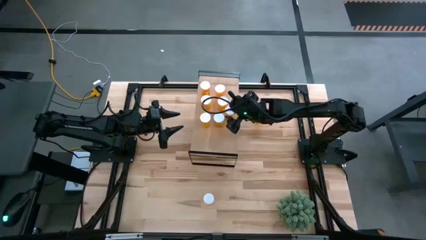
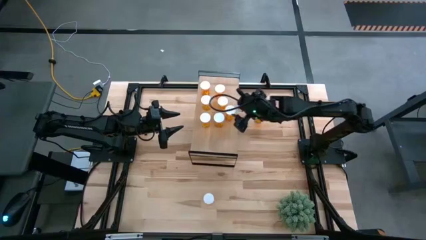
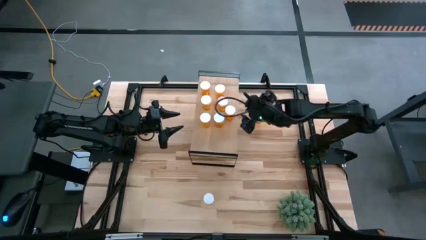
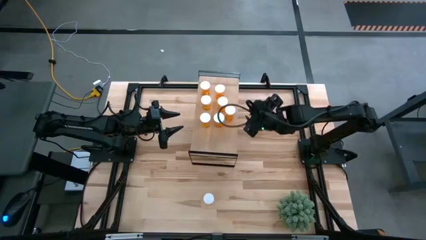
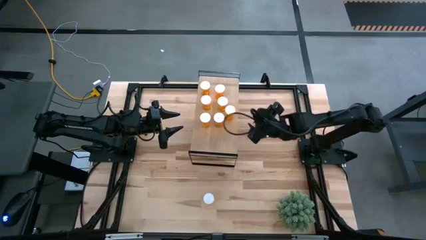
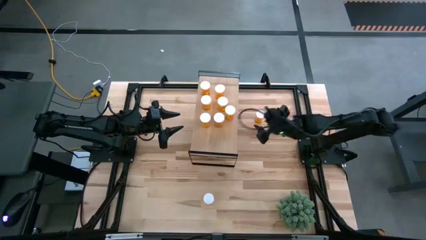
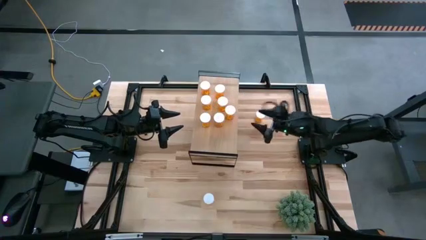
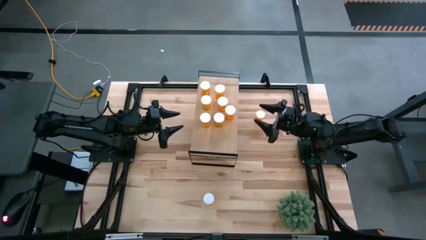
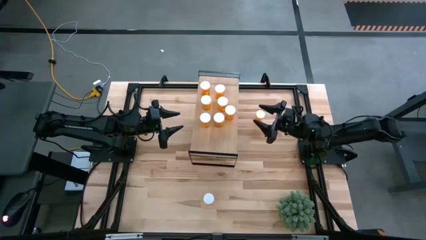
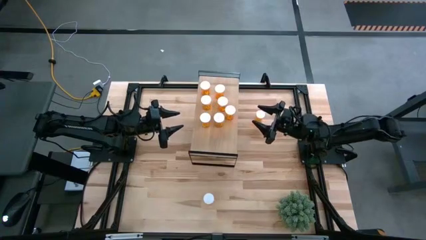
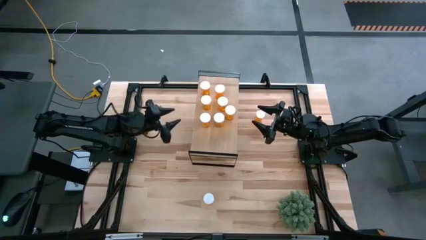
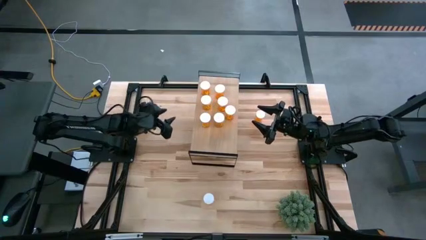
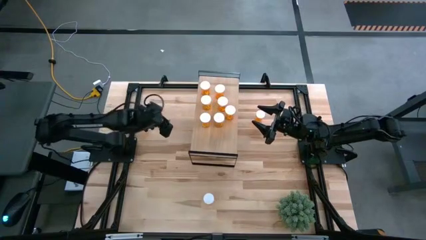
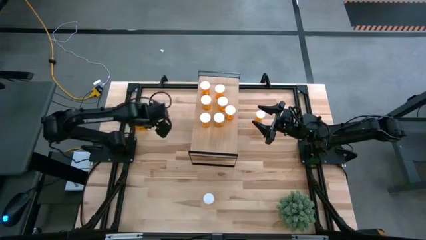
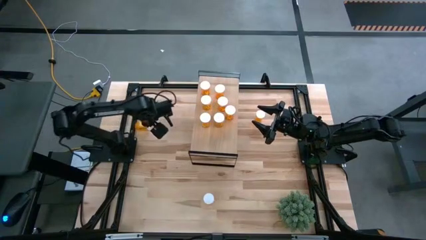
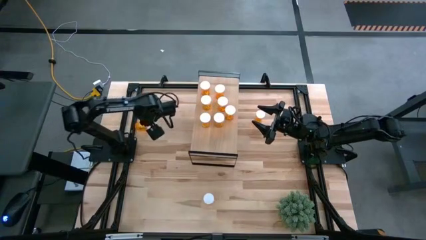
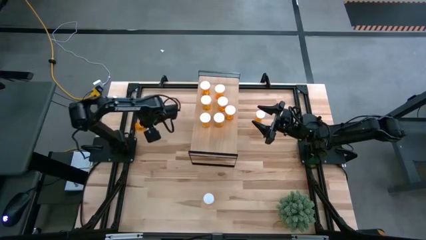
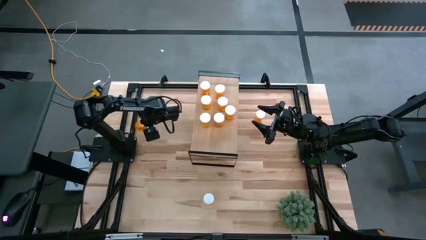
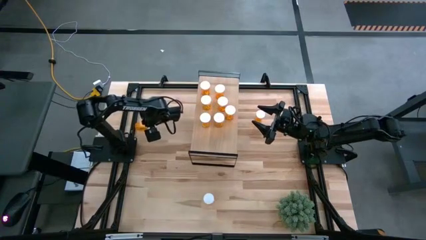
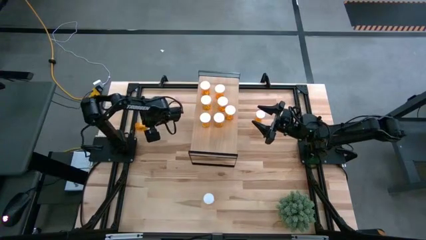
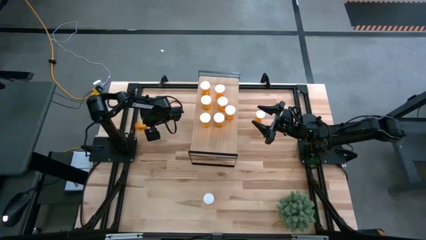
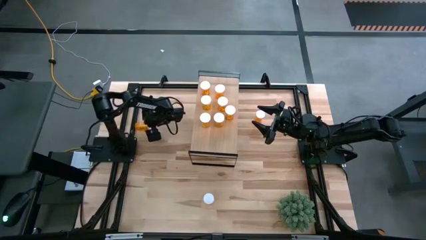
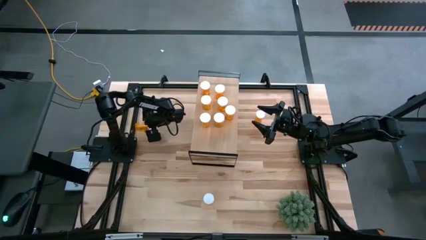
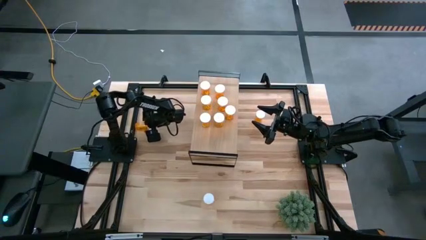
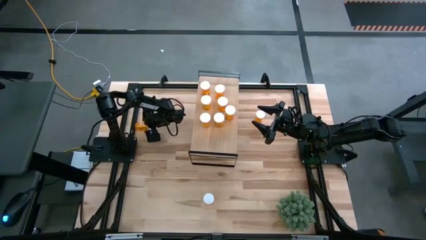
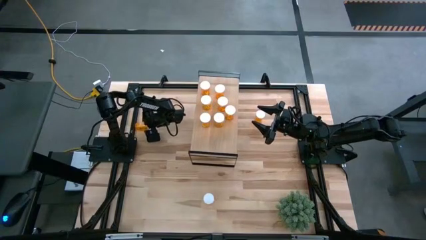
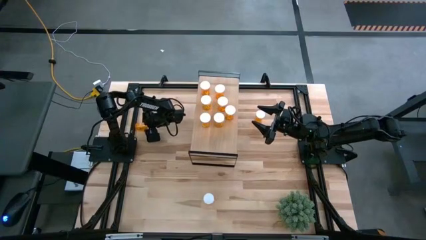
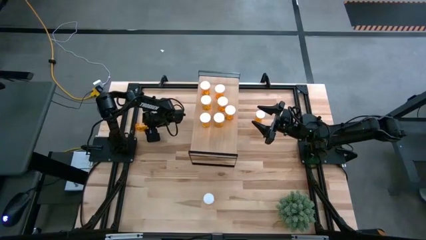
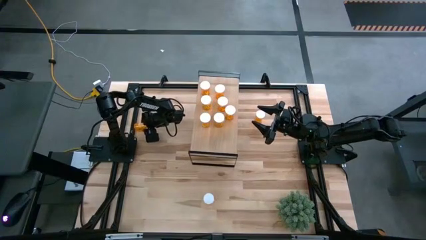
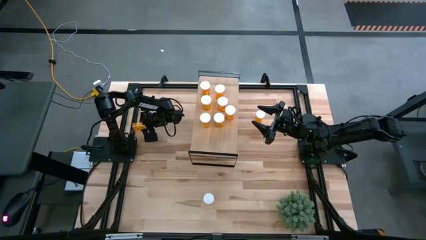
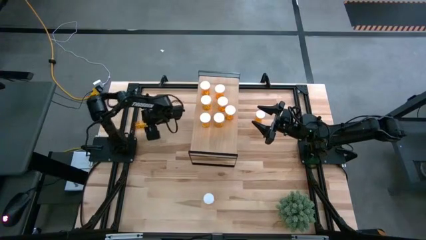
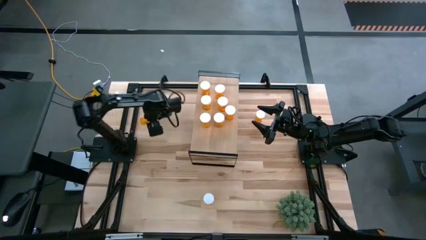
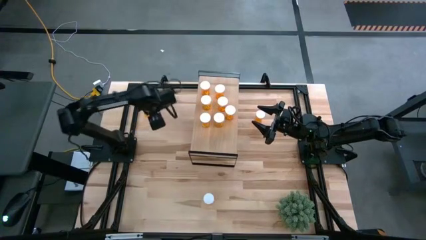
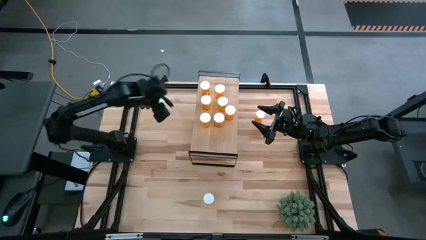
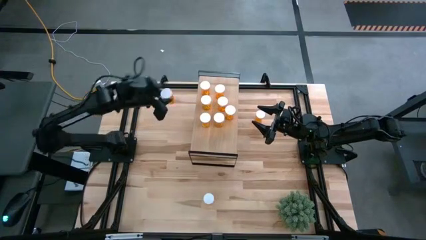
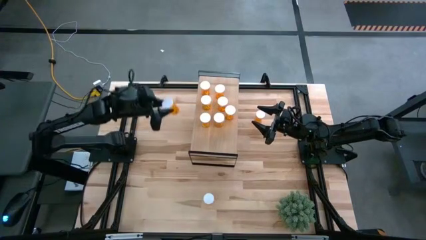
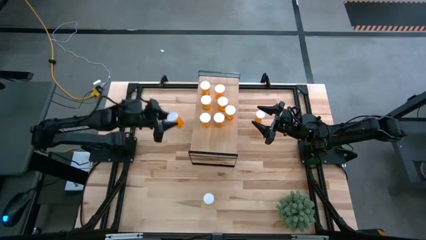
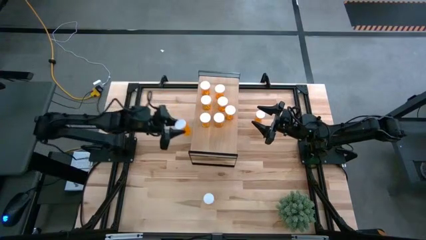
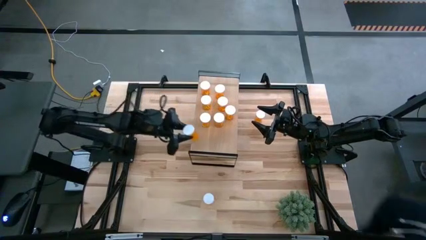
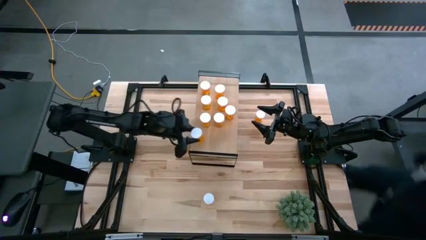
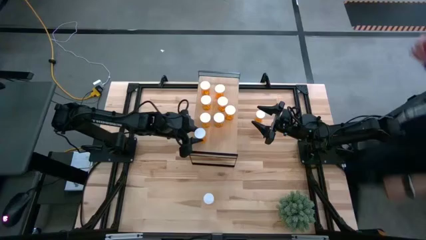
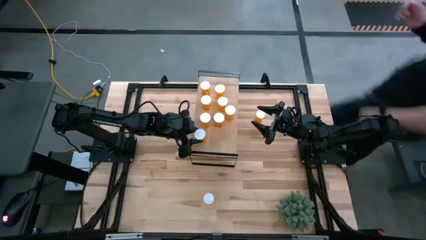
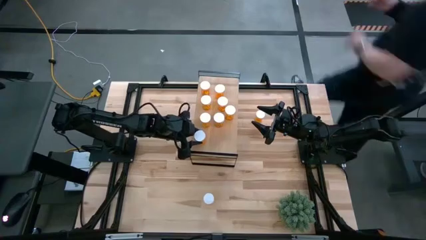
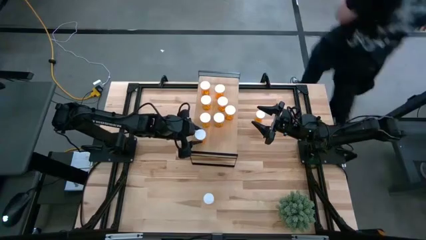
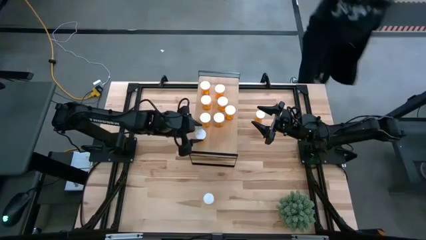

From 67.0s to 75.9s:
Task: Pick and place medicine bottles onto shelf by color
Put the orange pill bottle on the shelf

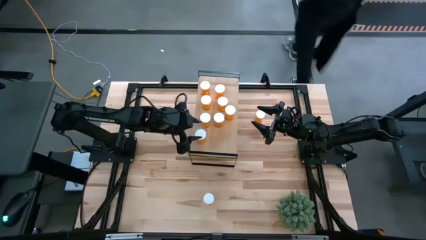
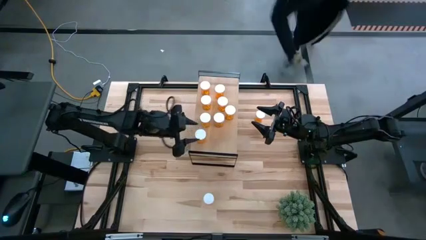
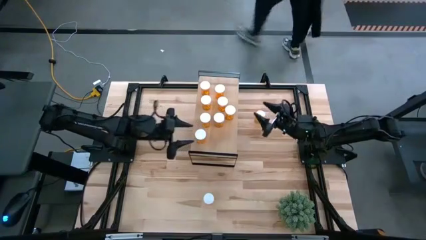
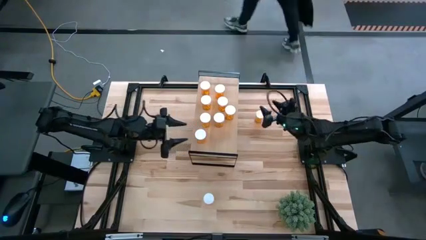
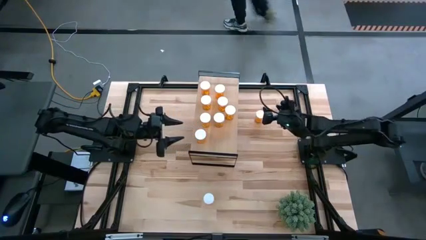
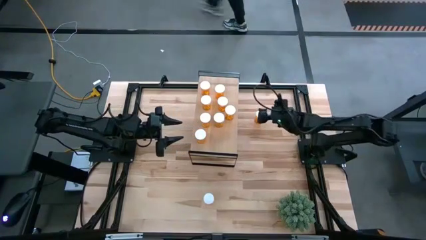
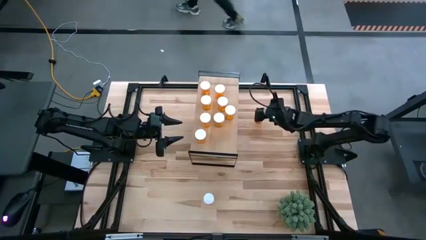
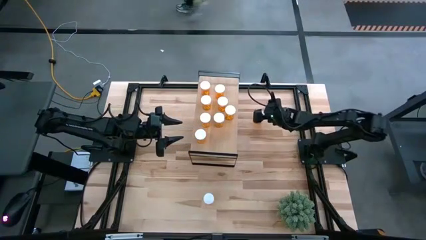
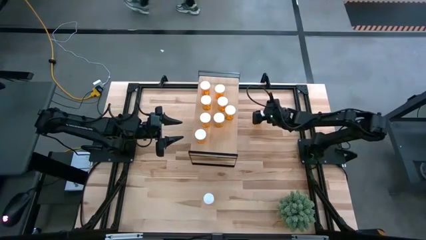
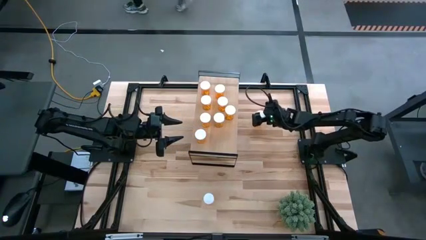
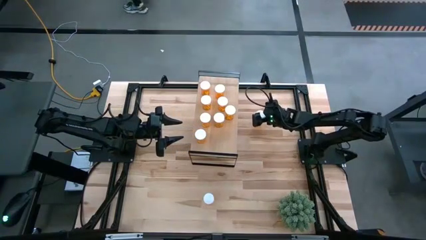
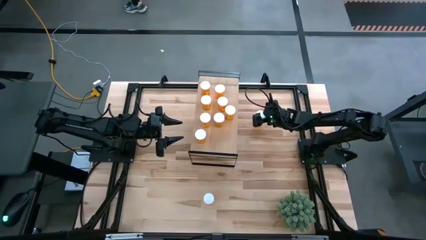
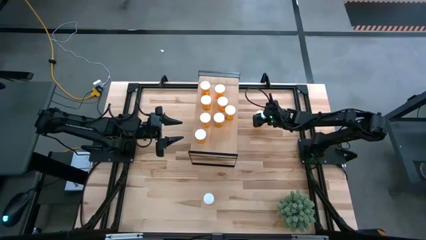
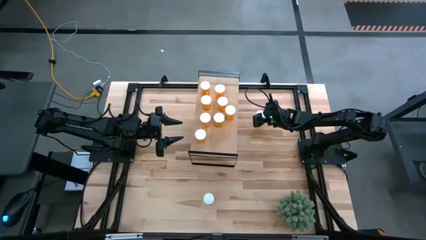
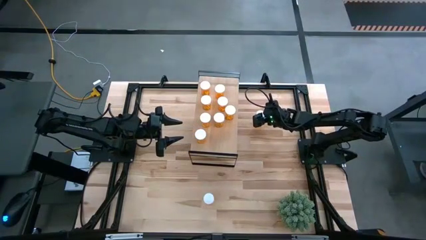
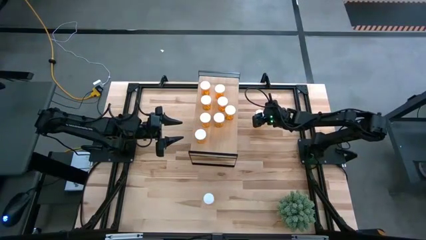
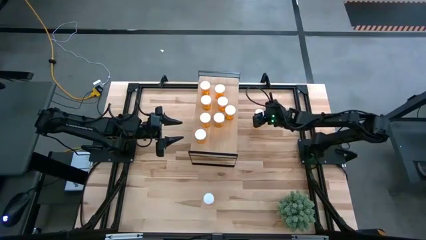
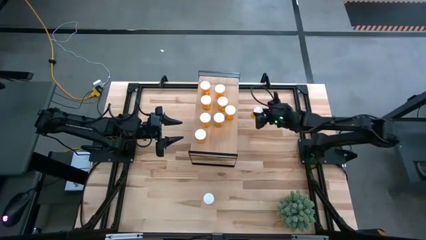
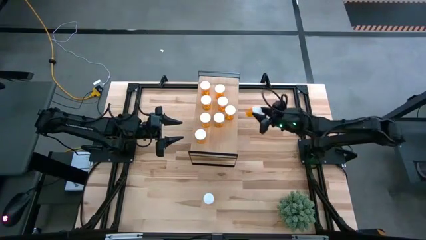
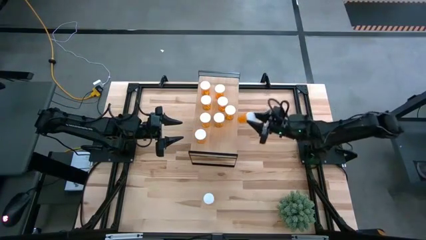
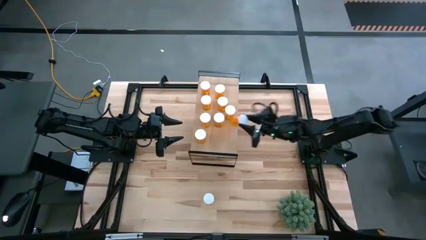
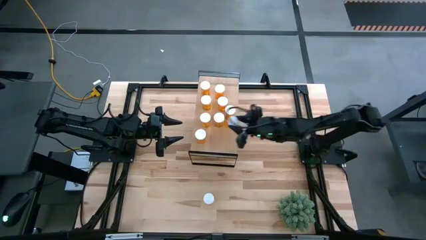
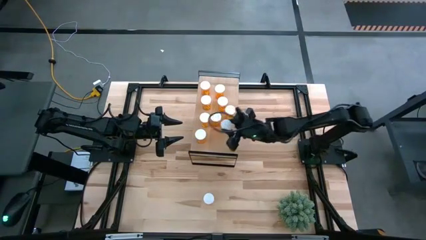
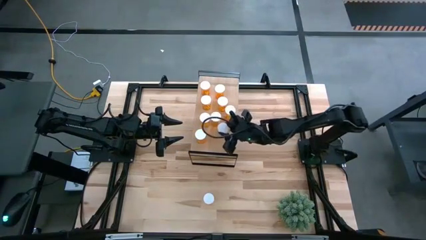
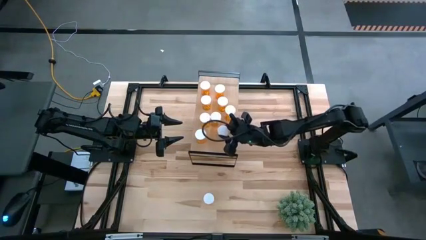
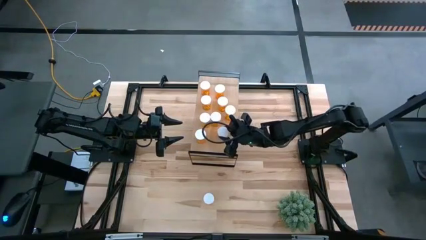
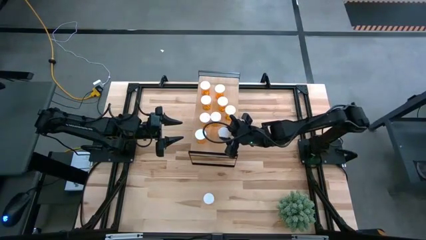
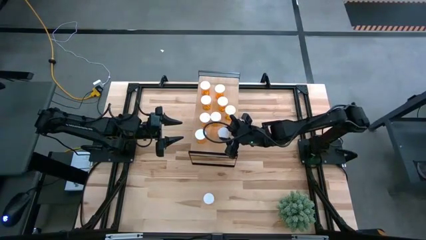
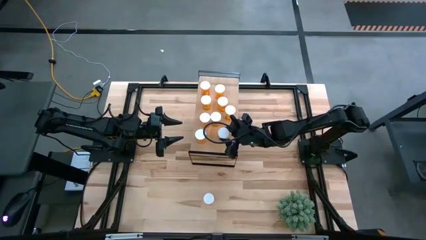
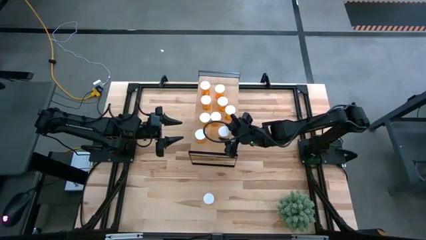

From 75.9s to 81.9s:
Put the orange pill bottle on the shelf
